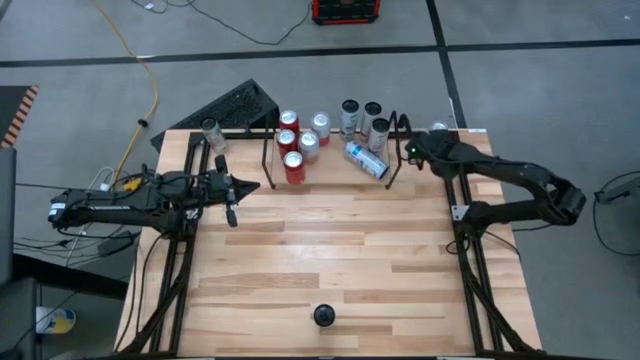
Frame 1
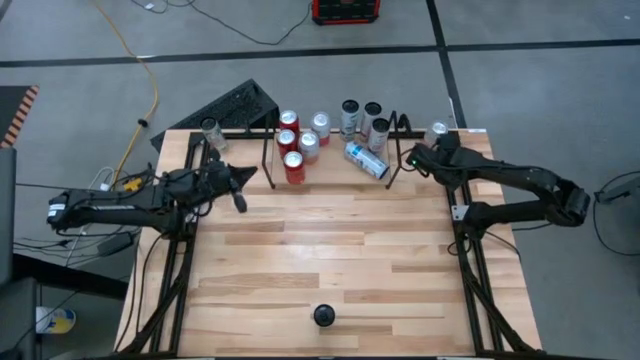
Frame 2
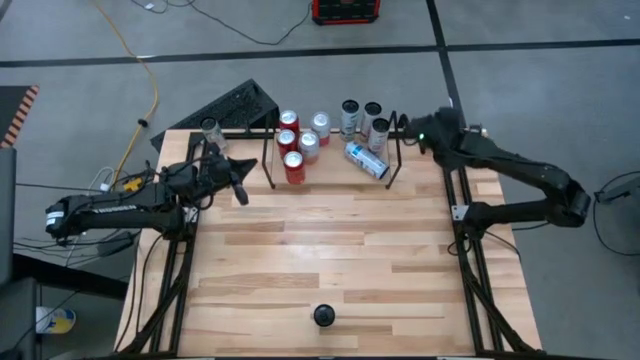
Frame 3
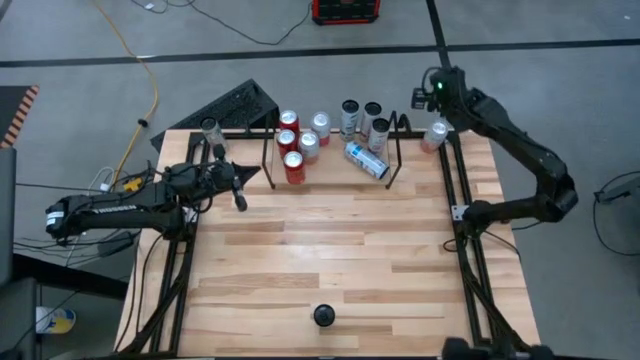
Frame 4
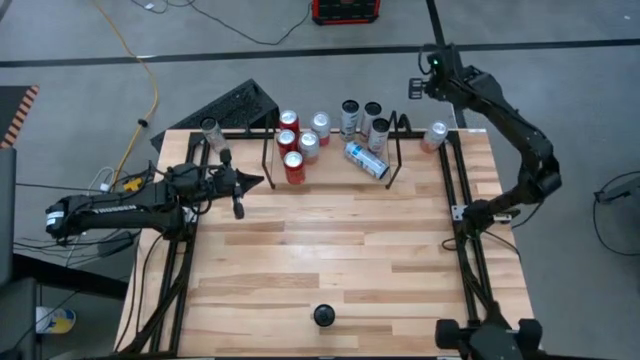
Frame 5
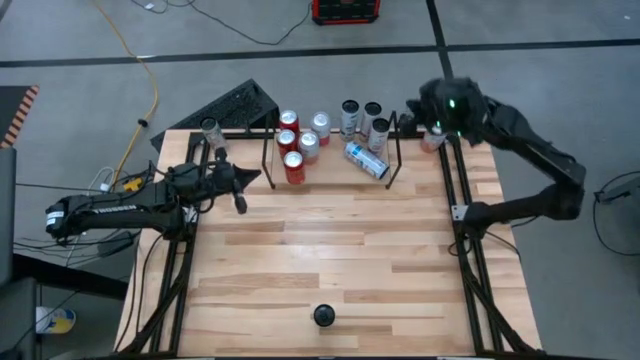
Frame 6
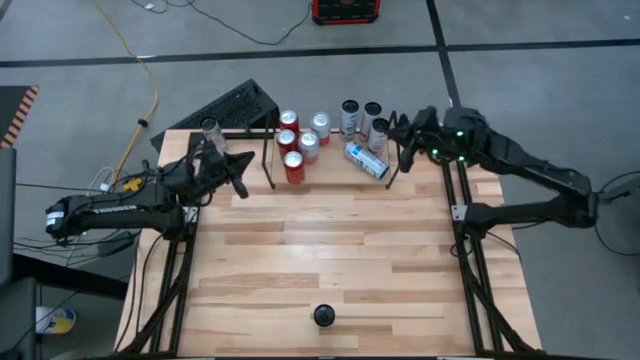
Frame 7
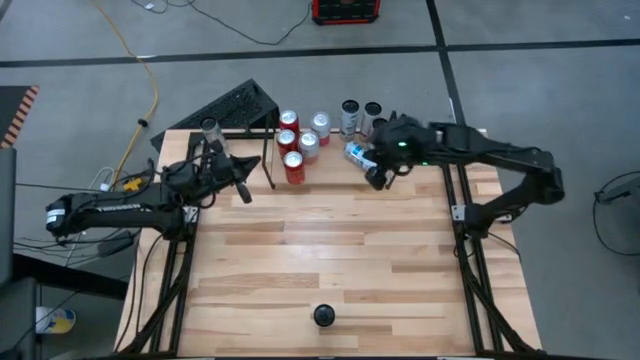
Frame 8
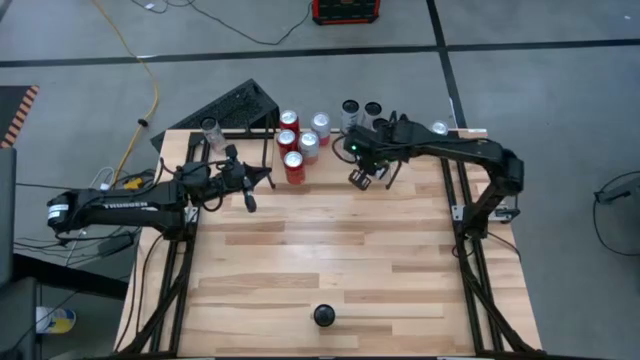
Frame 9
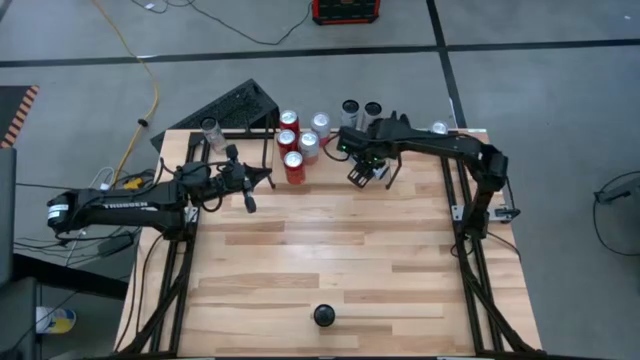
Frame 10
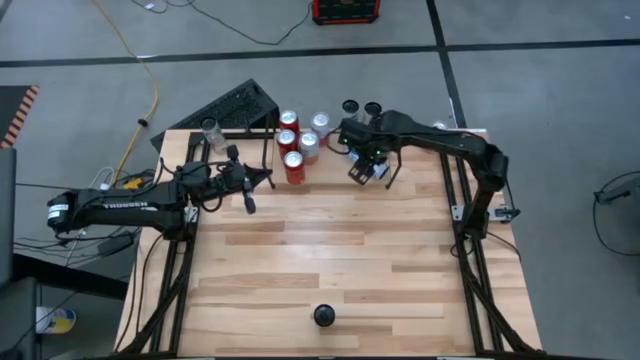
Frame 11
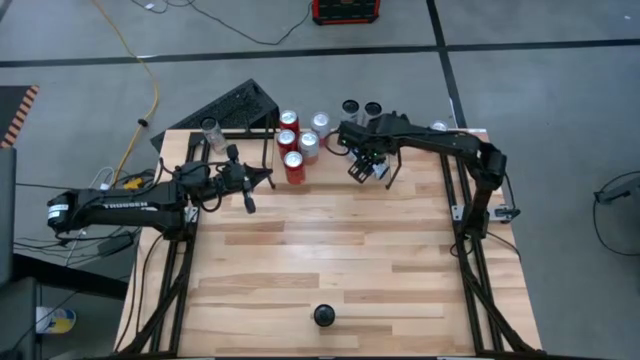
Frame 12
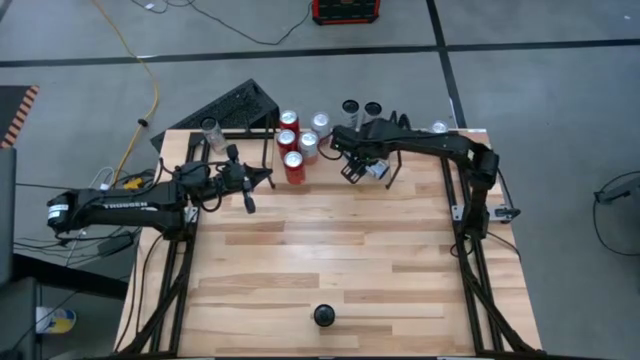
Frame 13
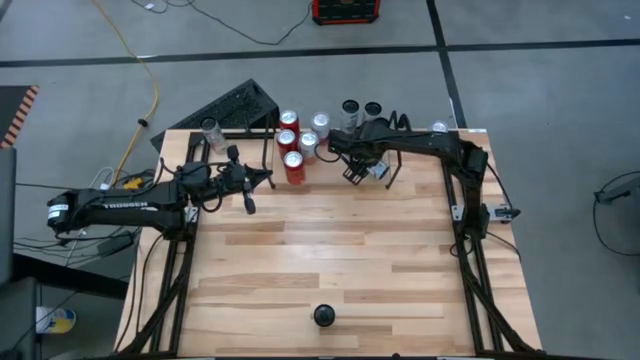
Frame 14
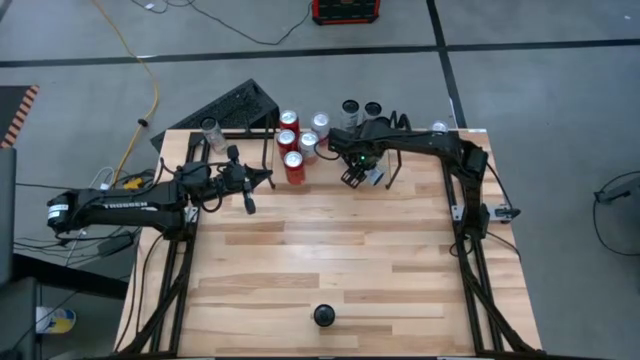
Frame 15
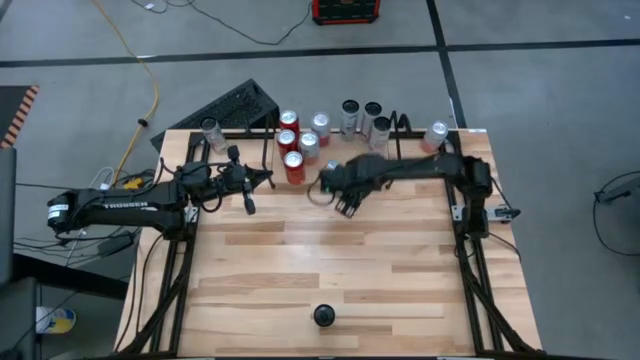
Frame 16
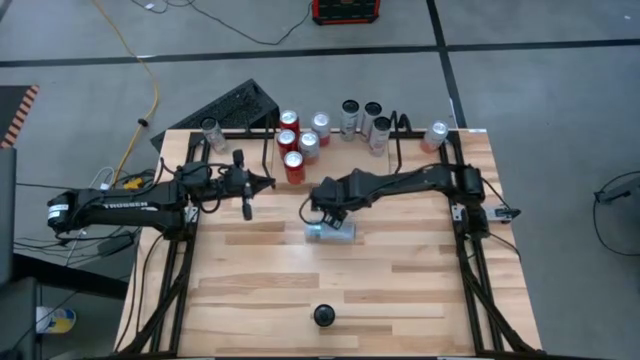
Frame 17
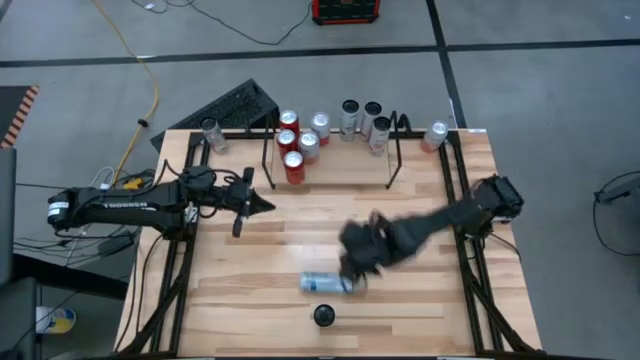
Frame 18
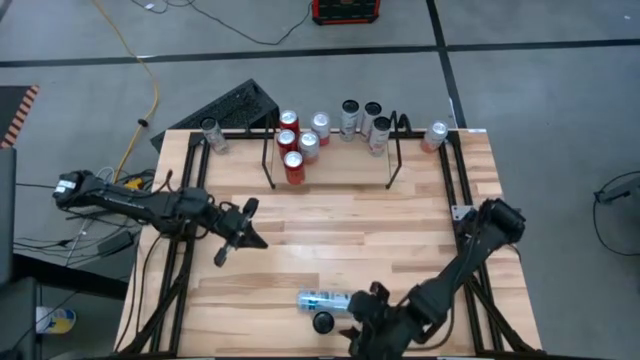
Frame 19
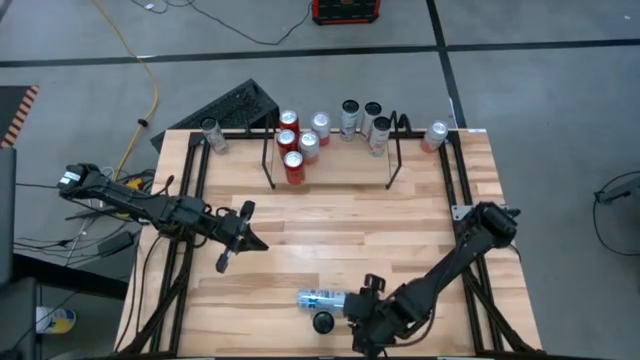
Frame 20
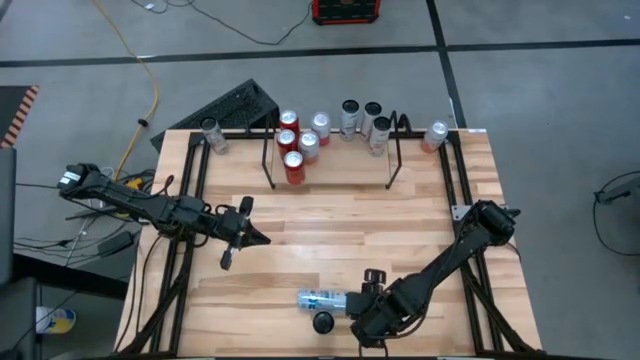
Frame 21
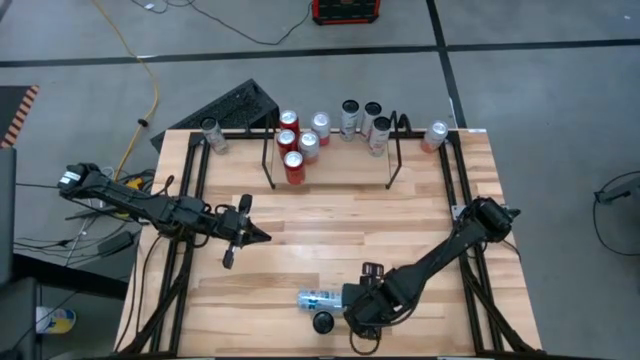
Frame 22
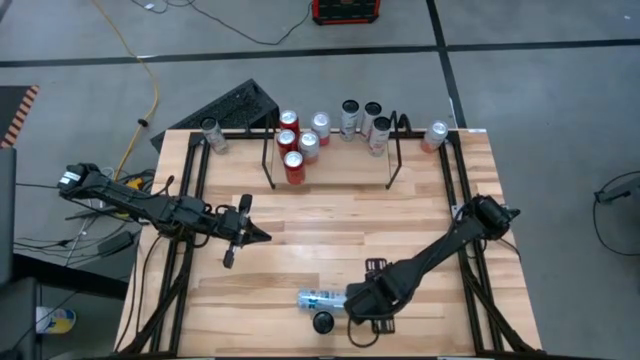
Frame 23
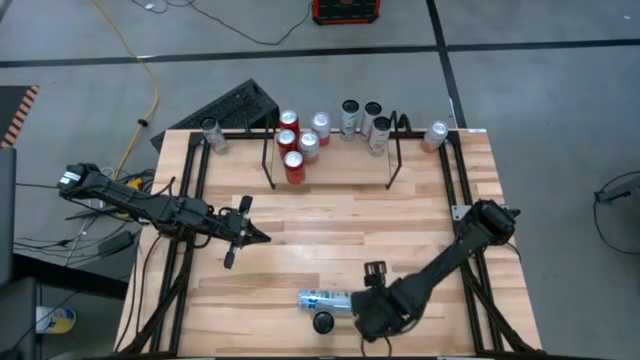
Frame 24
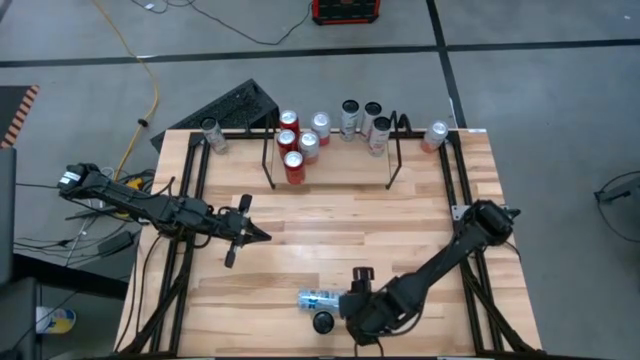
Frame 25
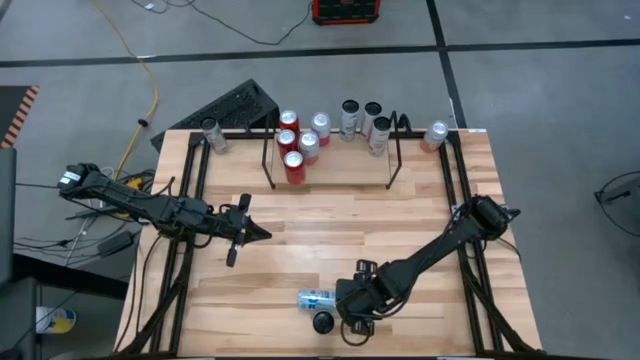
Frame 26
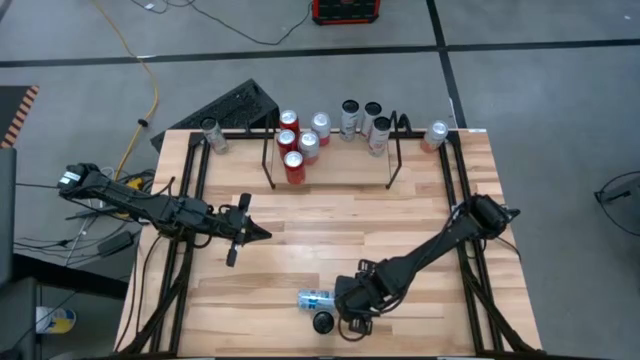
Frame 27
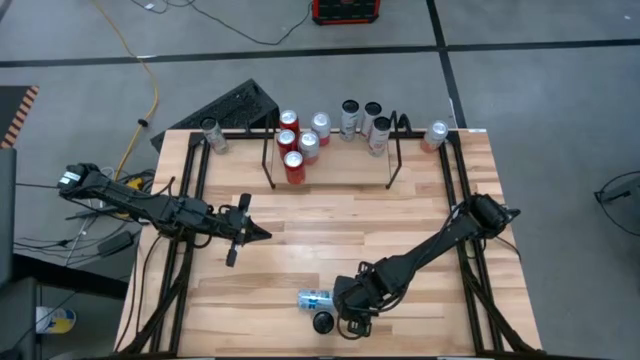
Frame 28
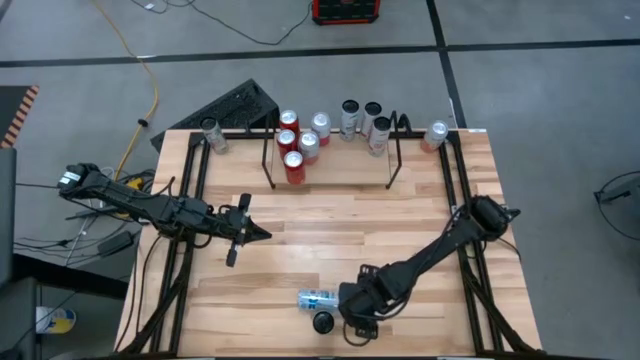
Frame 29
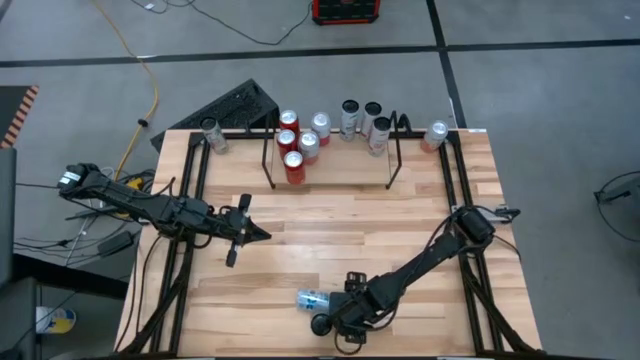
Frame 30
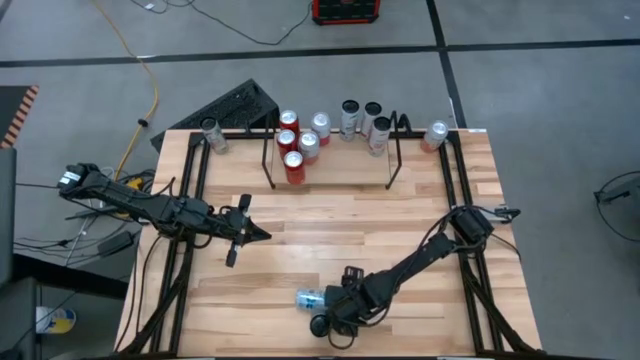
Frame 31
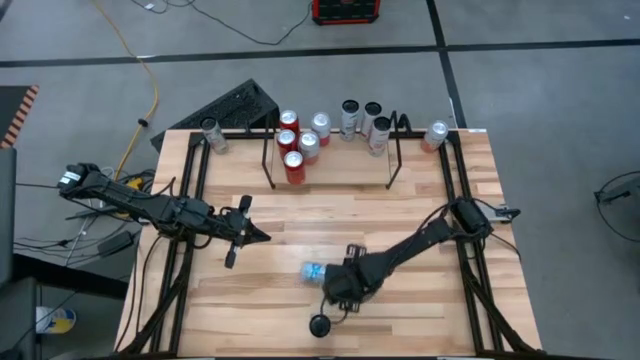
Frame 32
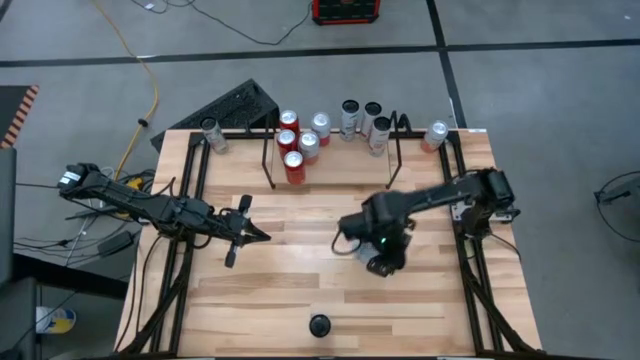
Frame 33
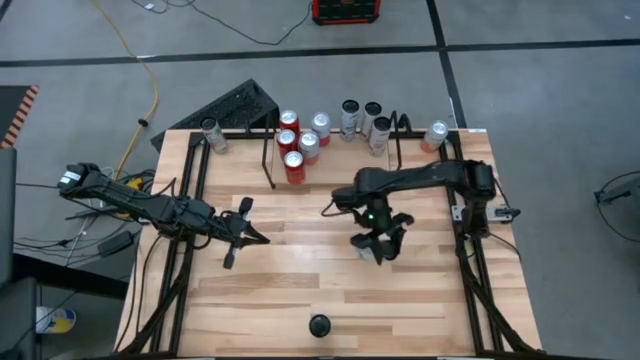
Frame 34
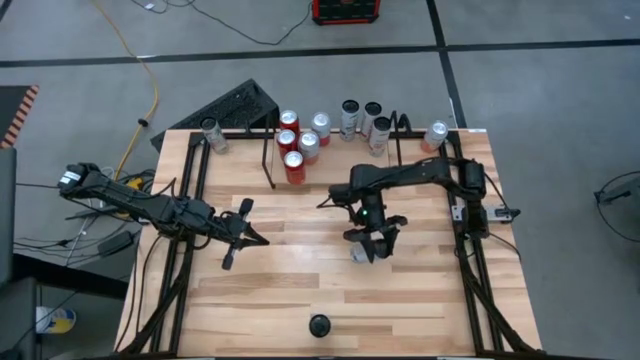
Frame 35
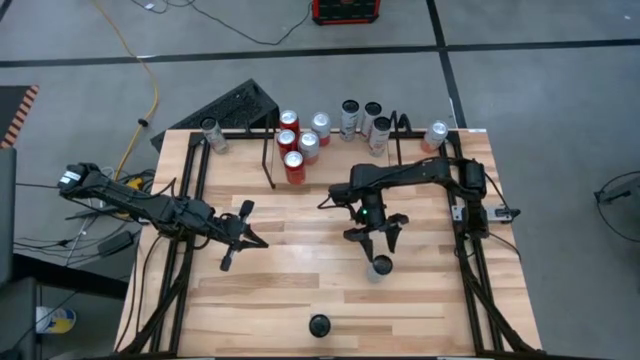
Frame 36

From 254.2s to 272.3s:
Task: Place canned beverage on shelf
Adjust the white blue soda can
